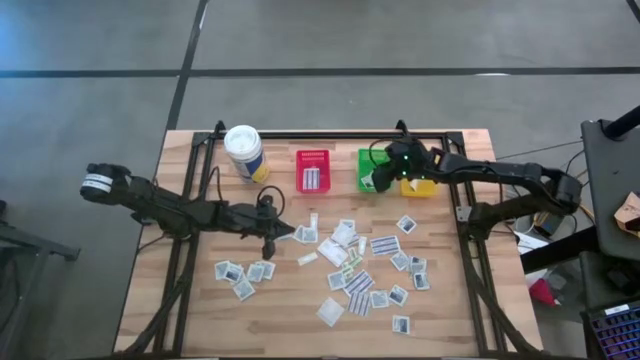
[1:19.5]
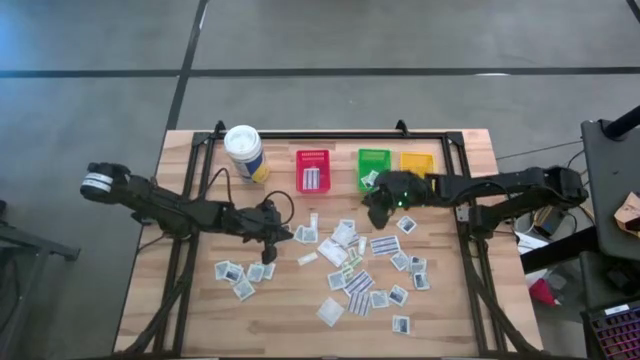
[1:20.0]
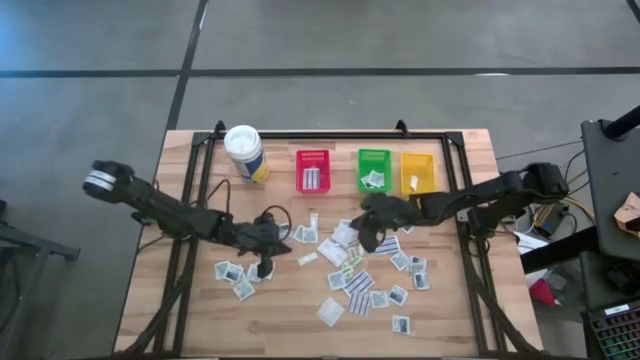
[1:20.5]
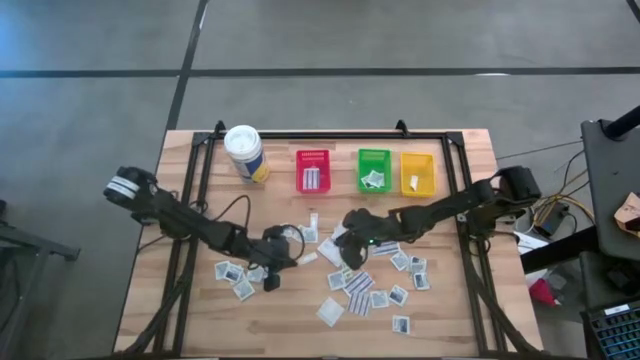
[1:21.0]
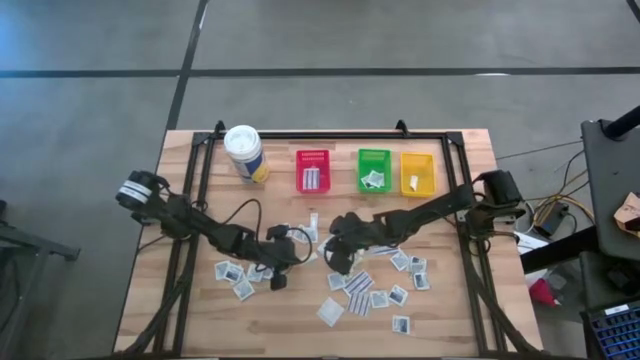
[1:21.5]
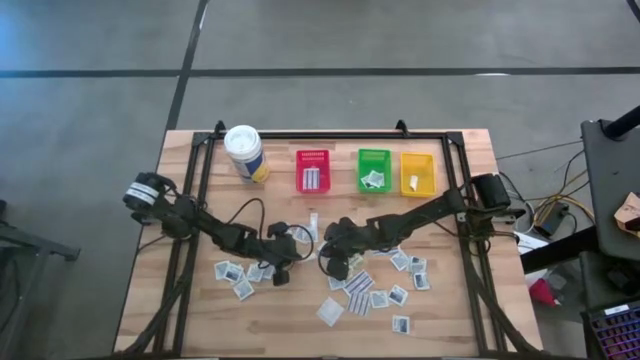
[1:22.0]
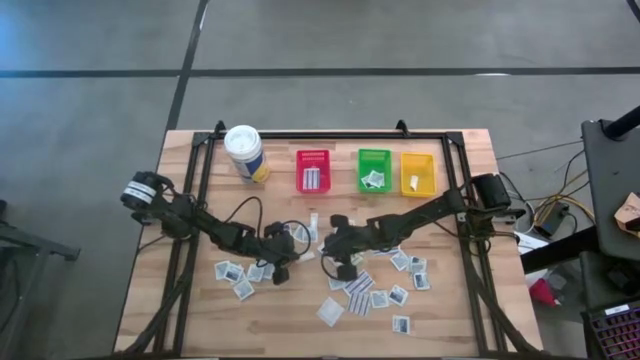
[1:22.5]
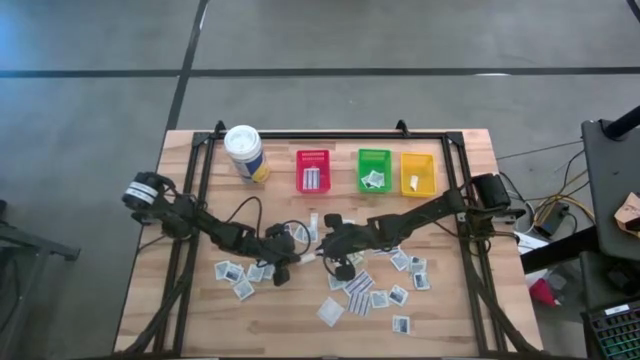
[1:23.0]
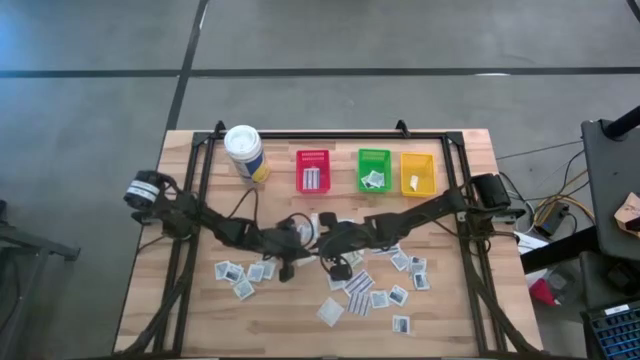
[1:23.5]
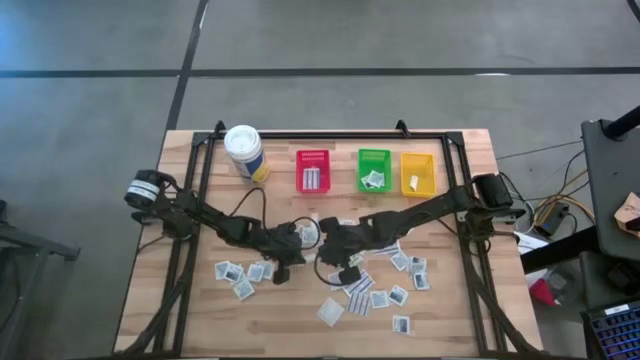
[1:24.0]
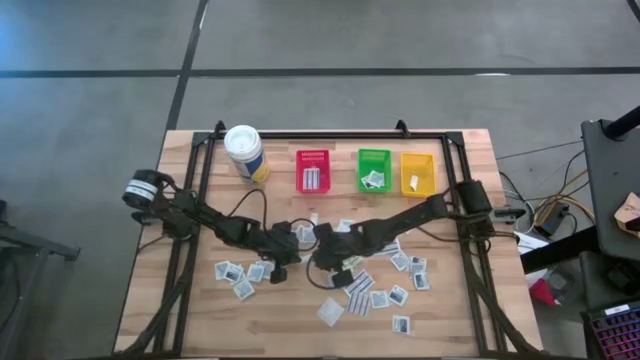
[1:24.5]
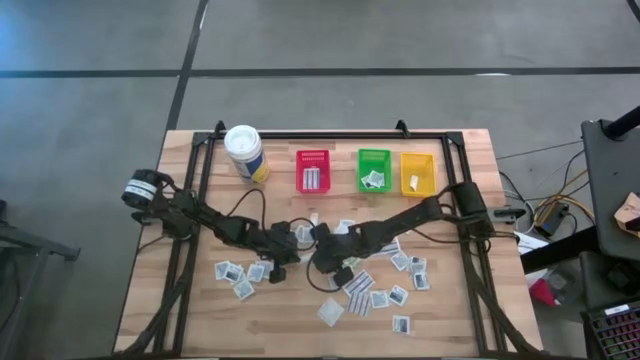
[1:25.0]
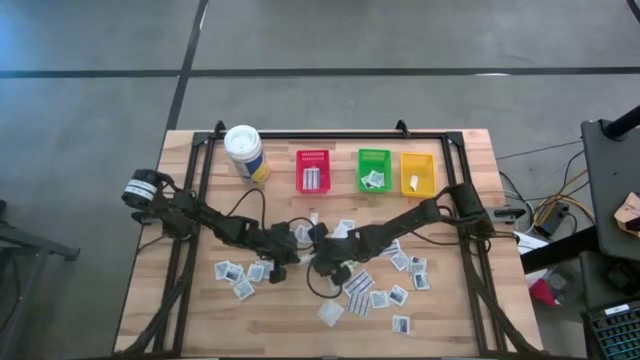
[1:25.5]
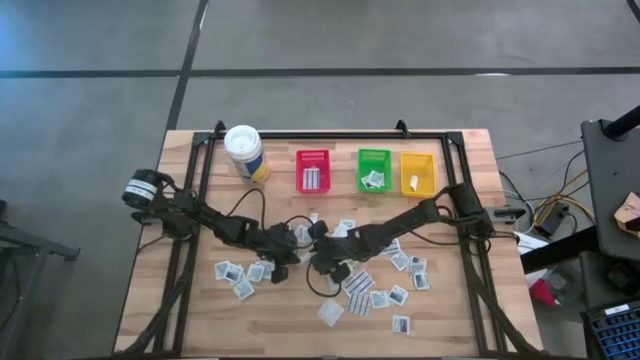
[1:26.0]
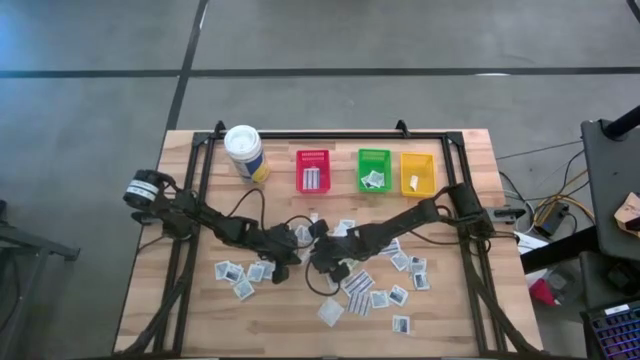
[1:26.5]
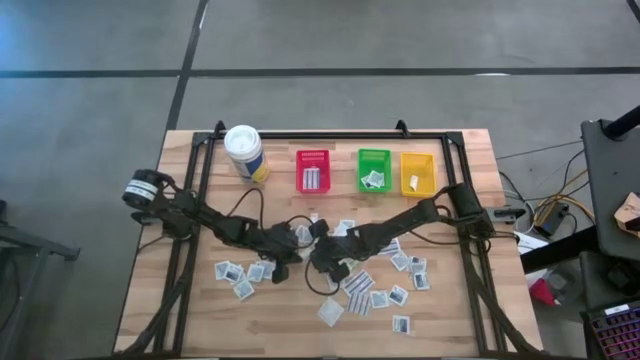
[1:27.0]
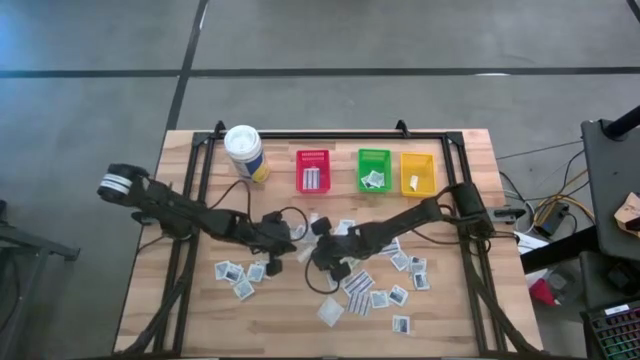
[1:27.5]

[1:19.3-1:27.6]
Task: Pick & Place First Aid Supplies
Put the green bandage in the yellow bin

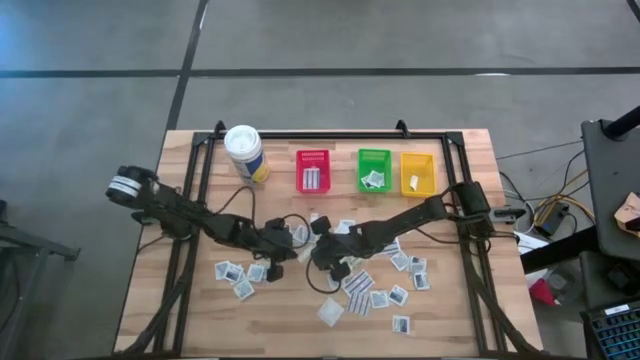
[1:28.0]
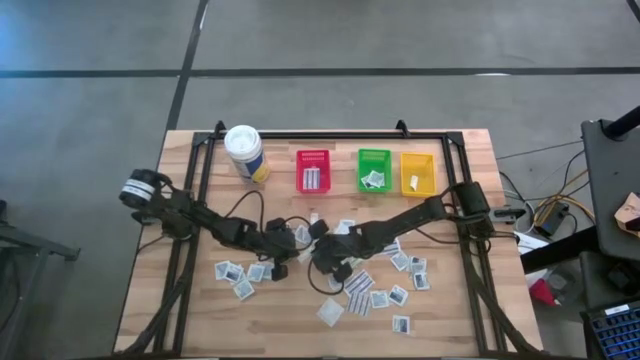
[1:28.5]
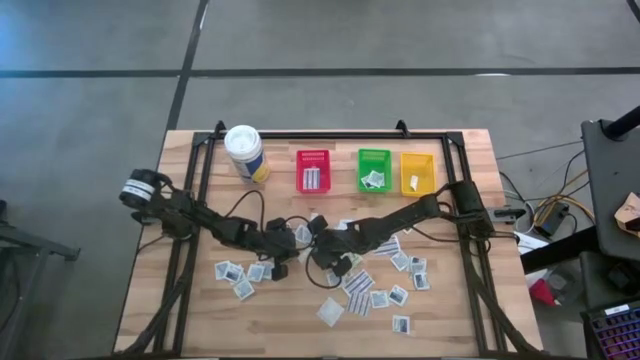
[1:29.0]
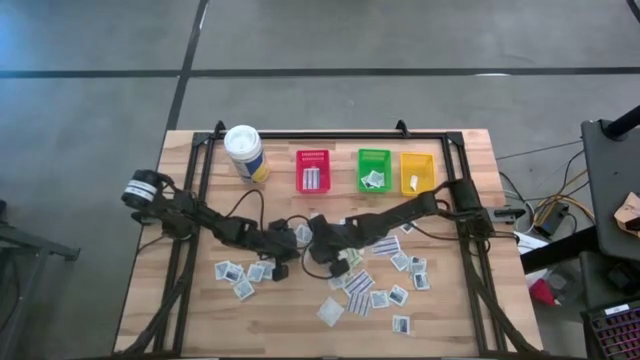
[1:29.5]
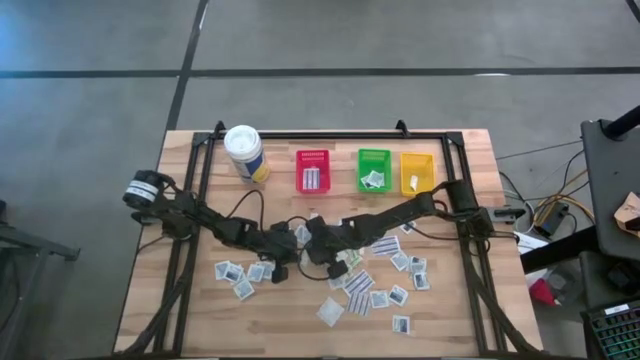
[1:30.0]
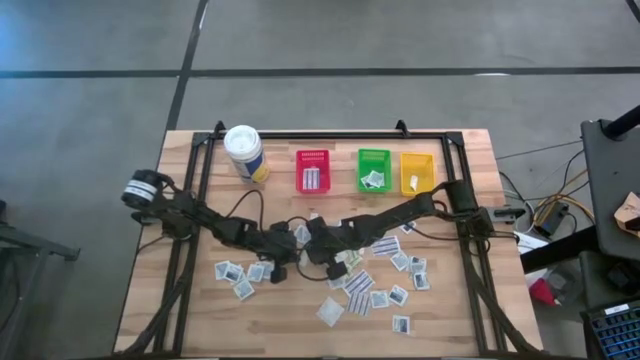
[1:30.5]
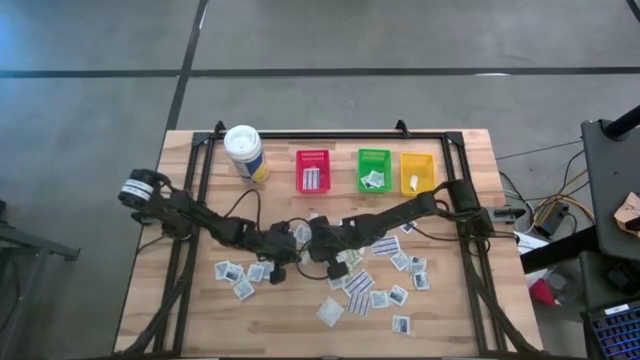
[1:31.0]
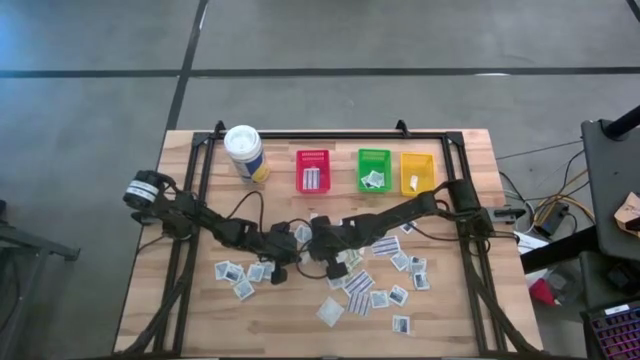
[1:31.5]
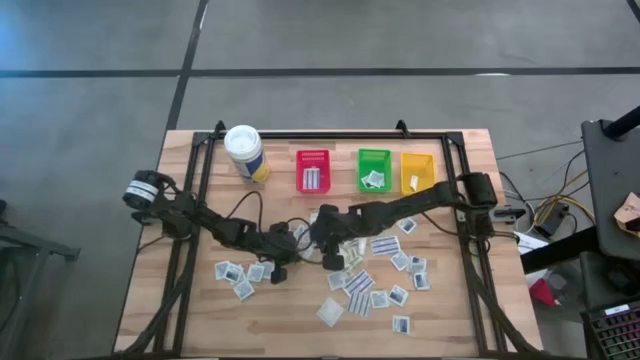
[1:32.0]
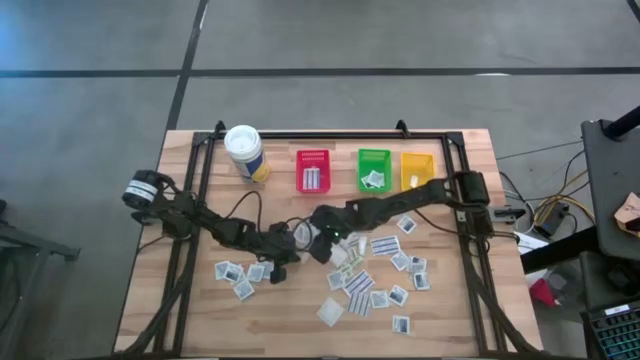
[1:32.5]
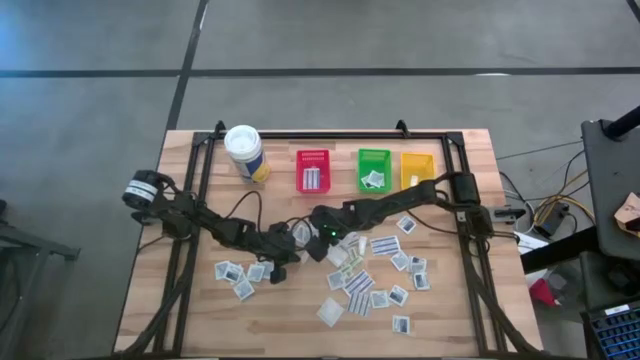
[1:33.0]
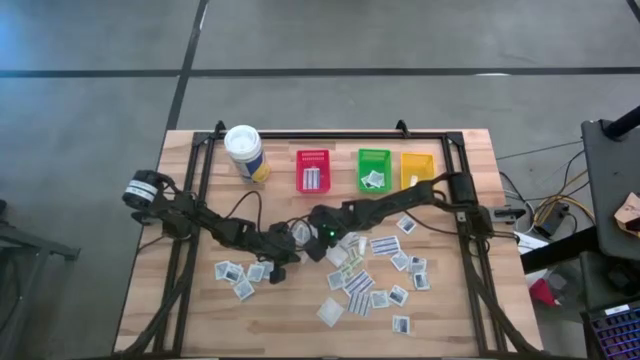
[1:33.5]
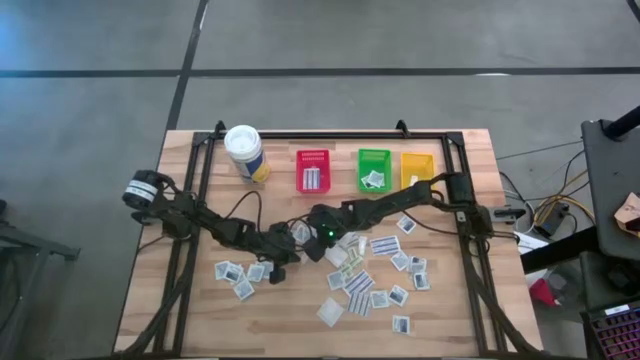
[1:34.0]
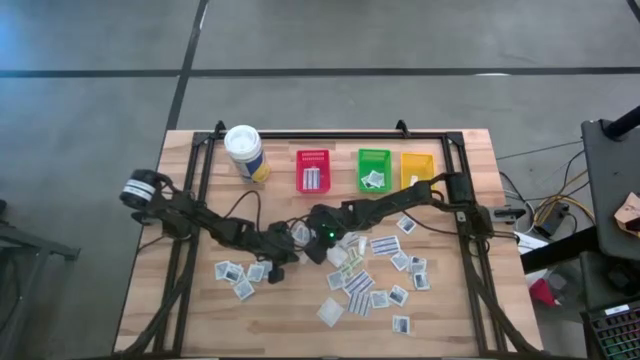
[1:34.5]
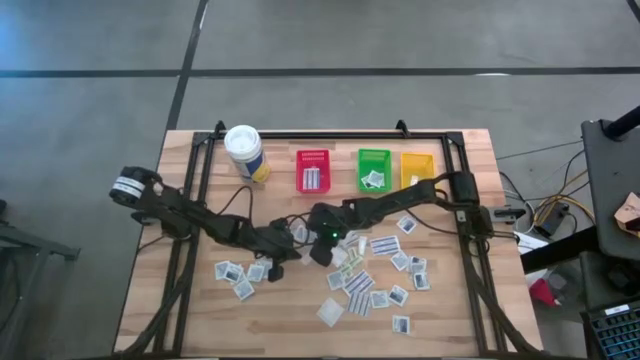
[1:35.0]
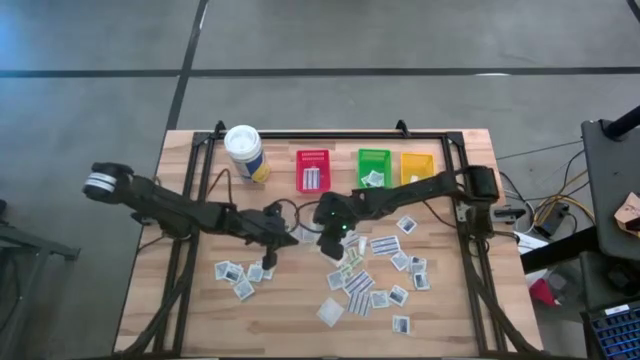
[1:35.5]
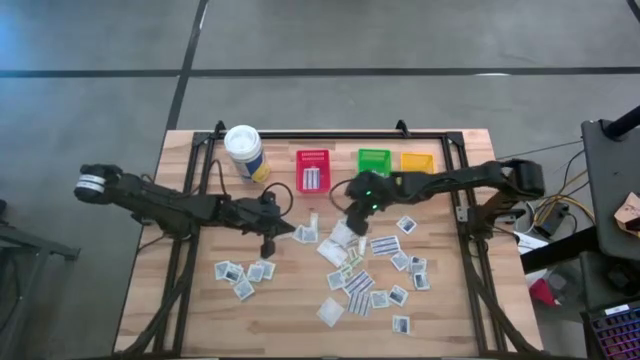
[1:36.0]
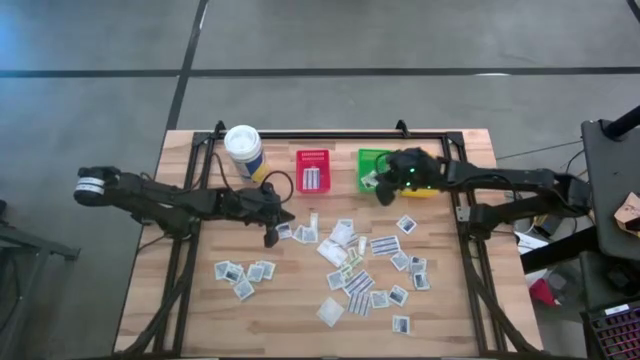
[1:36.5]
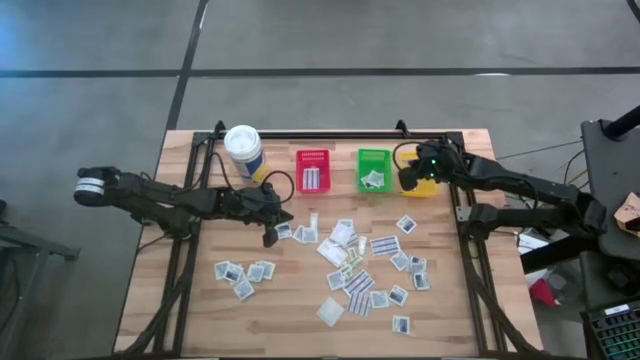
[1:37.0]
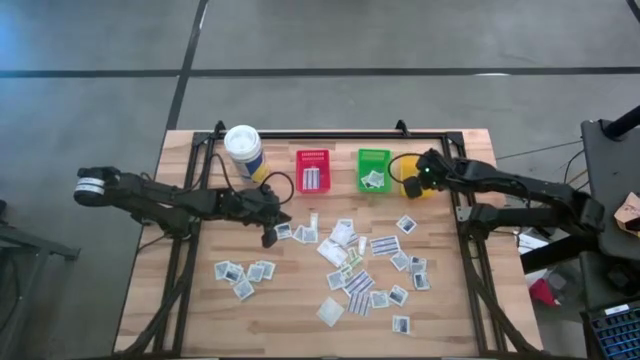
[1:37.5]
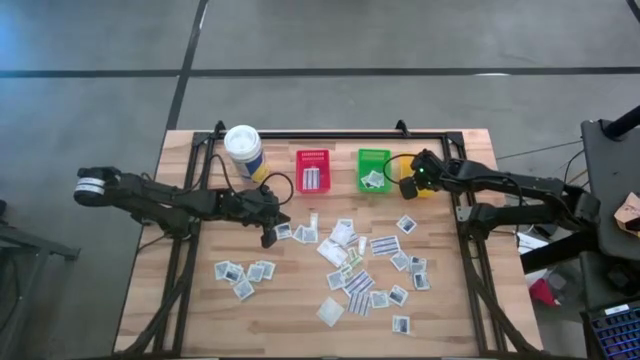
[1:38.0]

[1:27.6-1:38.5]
Put the green bandage in the yellow bin
